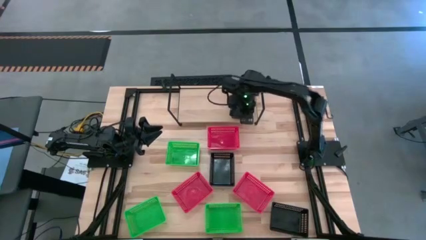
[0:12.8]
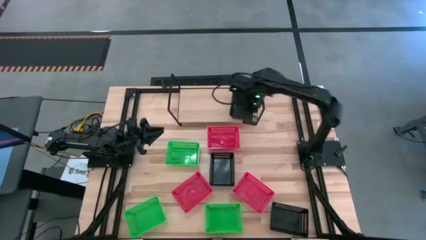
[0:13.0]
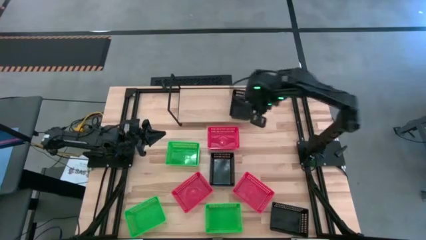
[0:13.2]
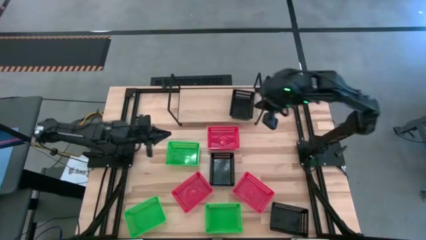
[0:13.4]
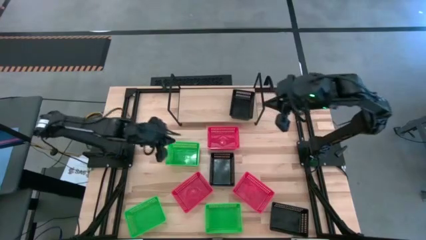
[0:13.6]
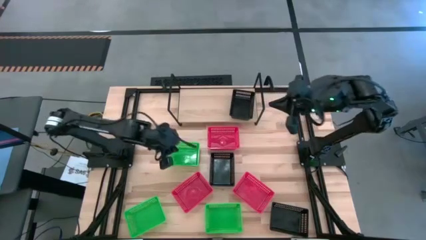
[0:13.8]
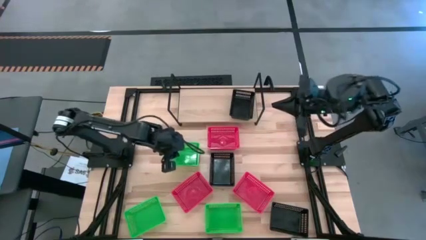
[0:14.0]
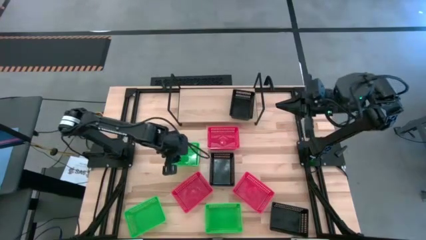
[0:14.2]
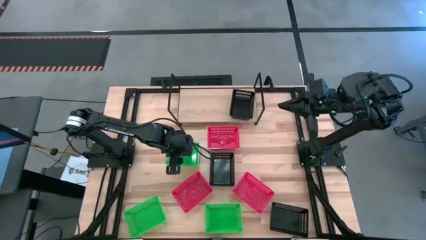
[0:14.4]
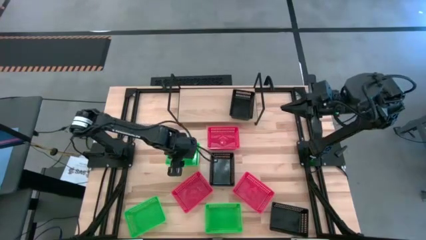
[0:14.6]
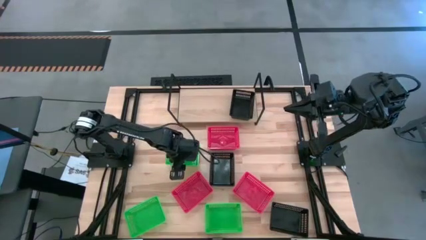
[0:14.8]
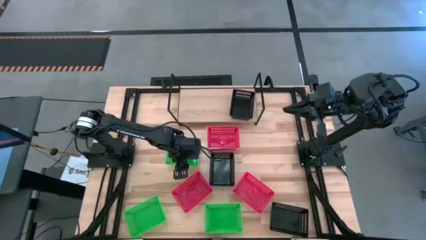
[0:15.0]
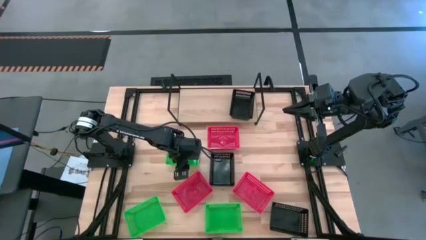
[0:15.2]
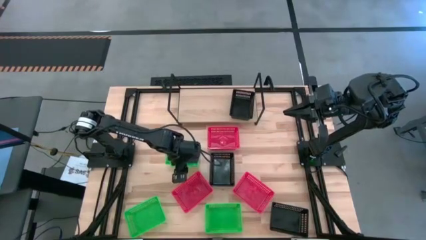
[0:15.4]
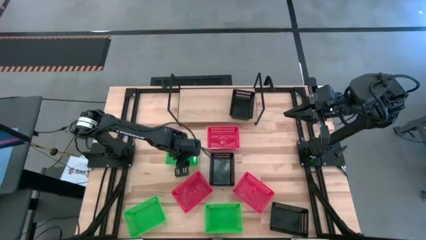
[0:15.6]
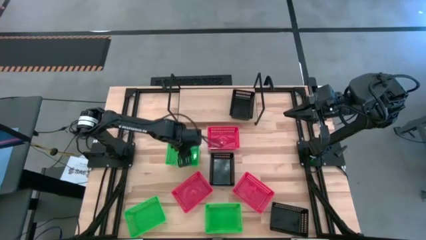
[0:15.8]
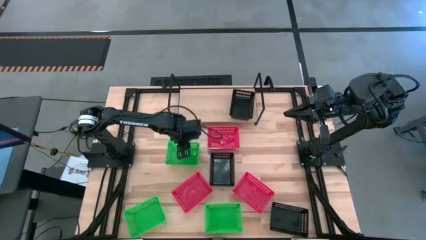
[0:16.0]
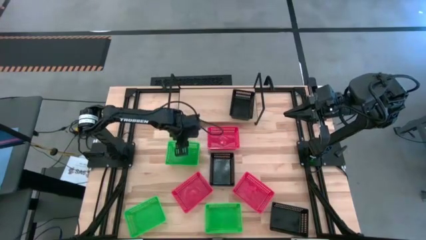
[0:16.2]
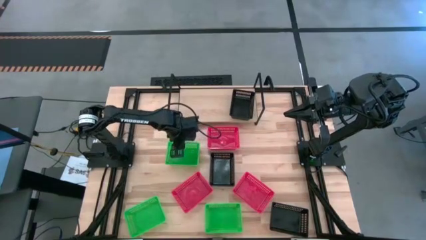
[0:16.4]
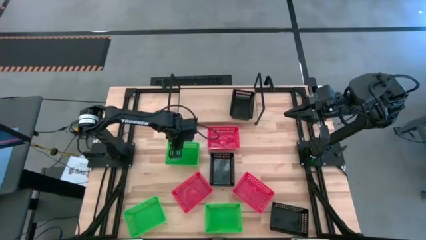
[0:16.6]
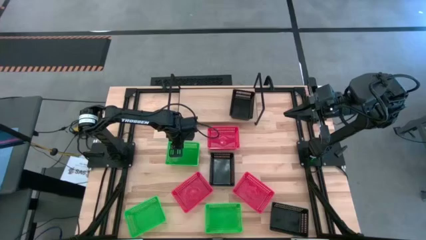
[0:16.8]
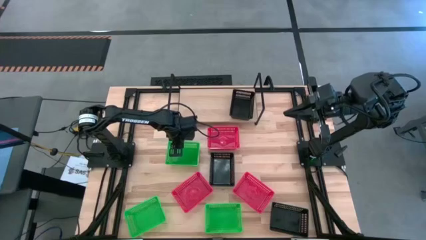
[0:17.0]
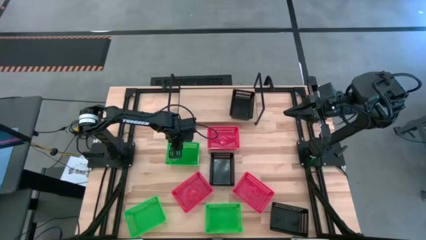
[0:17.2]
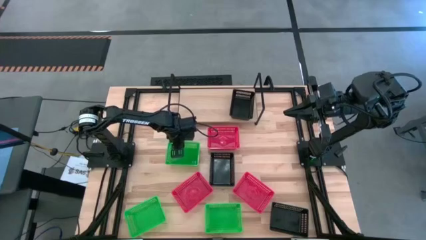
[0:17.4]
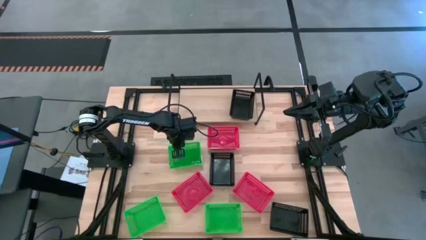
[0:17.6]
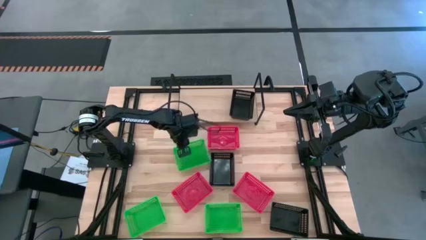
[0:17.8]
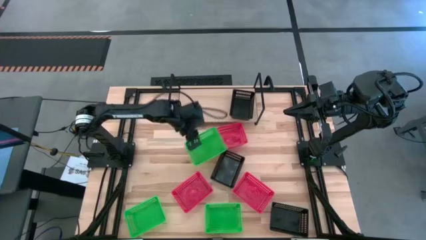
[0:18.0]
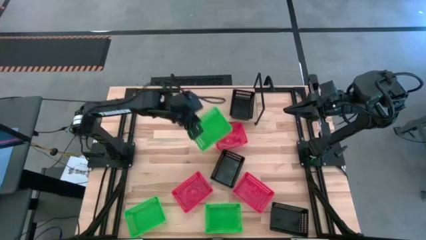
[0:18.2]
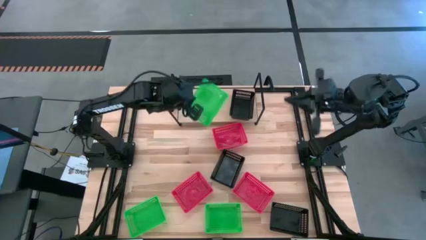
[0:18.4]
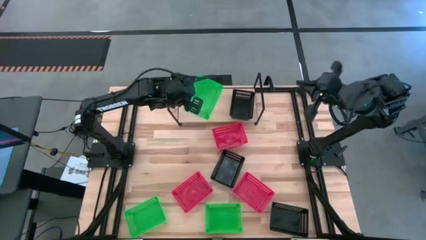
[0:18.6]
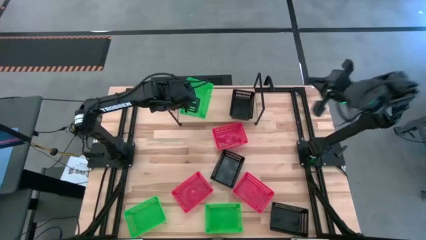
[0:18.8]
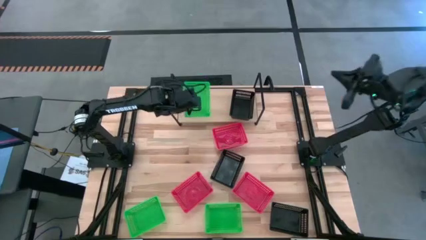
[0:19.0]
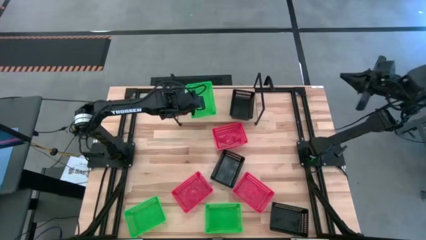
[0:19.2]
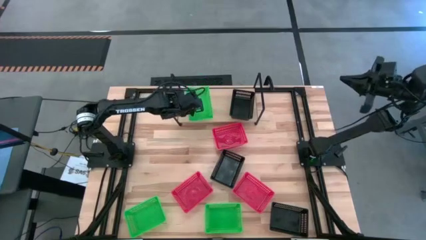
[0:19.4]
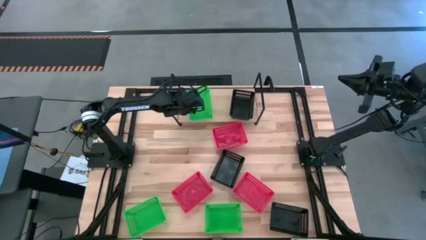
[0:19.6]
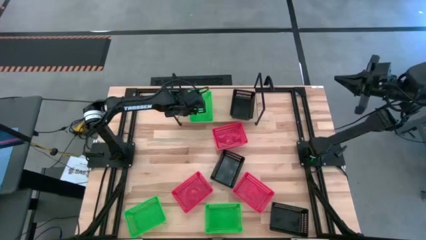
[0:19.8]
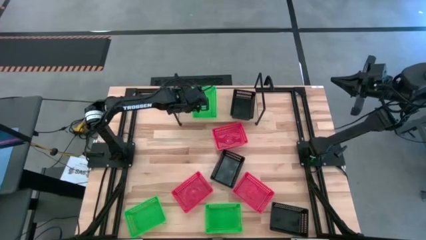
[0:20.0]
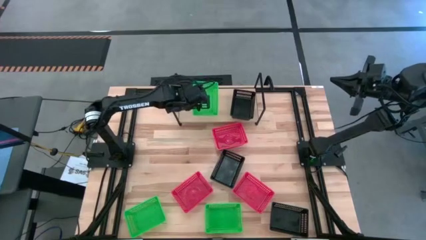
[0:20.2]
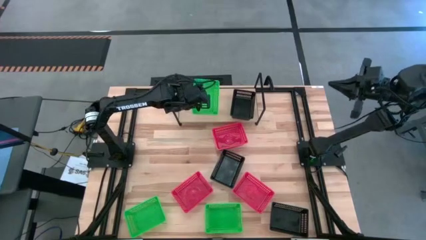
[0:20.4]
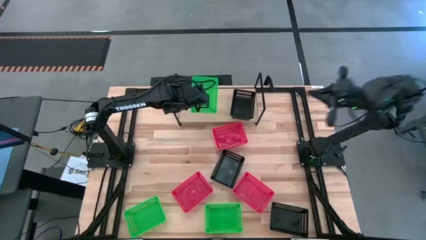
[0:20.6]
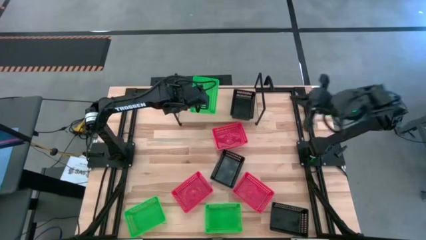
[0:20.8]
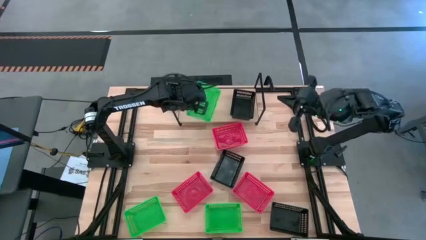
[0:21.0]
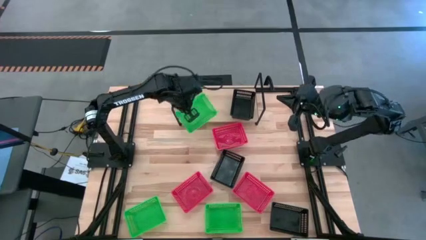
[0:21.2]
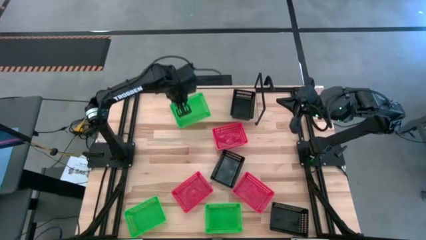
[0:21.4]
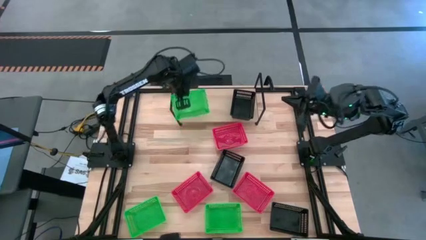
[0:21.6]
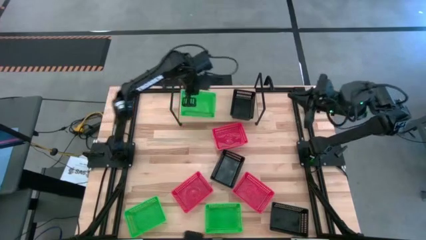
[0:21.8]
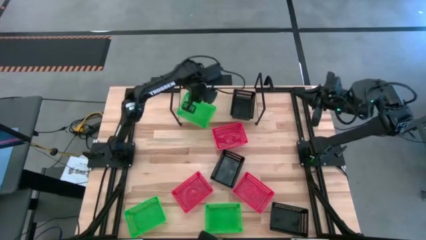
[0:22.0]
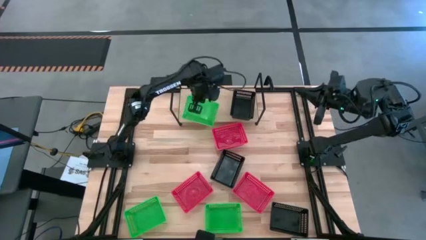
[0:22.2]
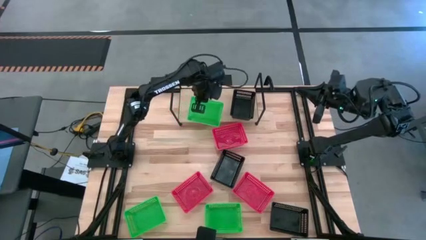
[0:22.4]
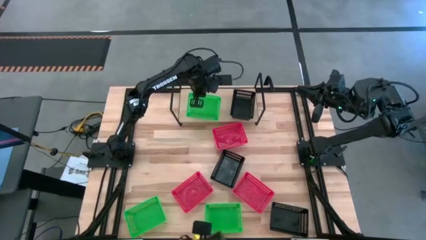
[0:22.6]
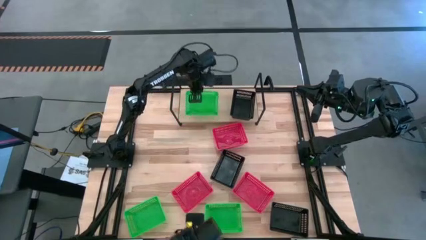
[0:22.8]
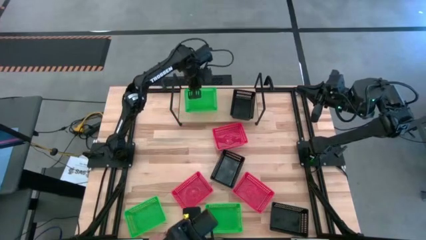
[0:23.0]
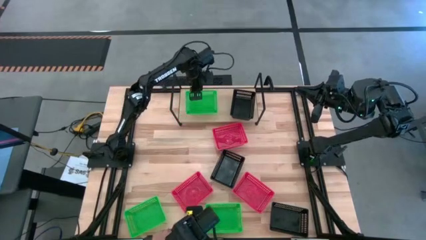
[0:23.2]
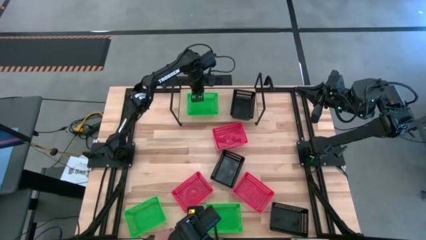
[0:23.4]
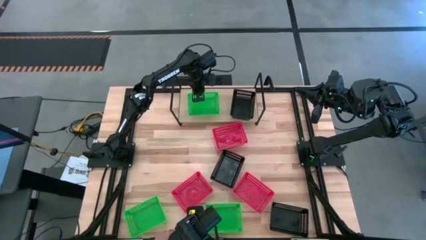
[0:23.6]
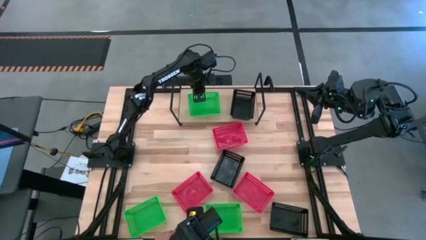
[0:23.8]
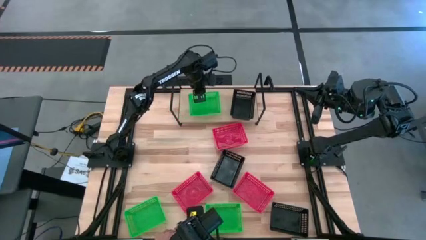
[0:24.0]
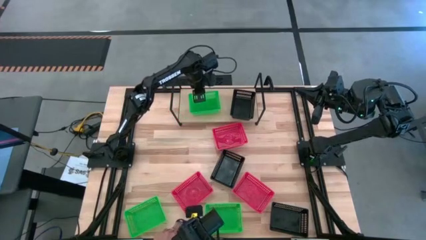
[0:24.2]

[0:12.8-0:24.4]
Task: Stack baskets on shelf by color
Put the top green bin on the shelf

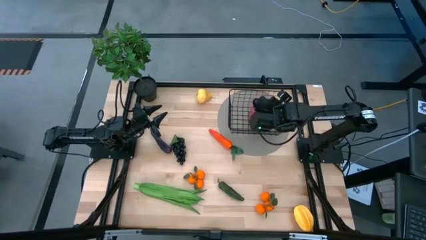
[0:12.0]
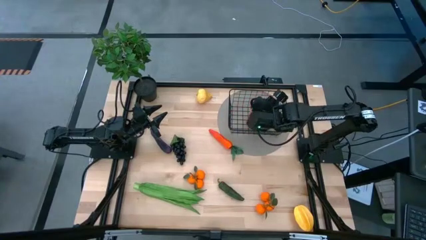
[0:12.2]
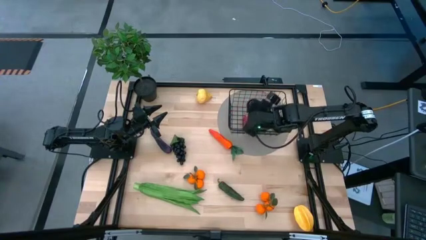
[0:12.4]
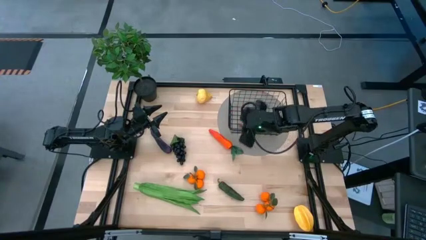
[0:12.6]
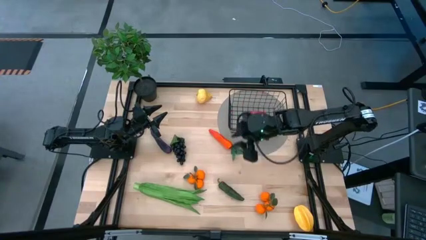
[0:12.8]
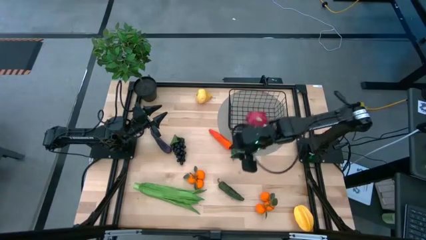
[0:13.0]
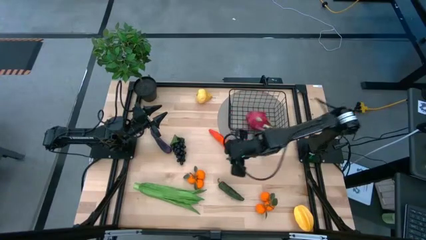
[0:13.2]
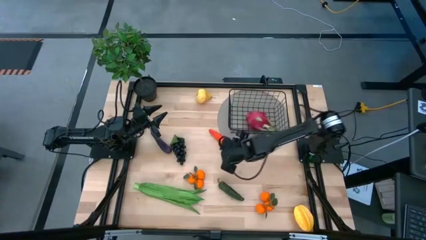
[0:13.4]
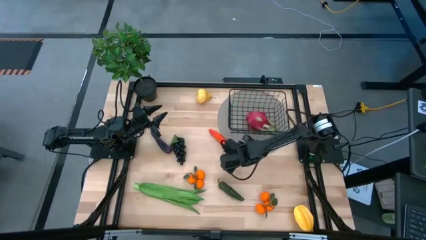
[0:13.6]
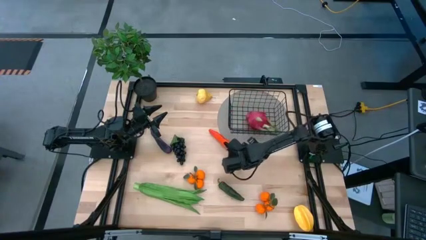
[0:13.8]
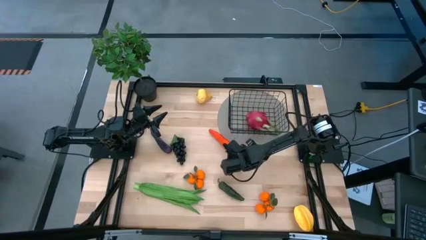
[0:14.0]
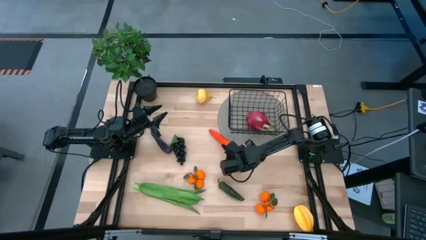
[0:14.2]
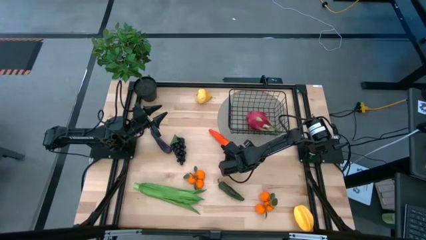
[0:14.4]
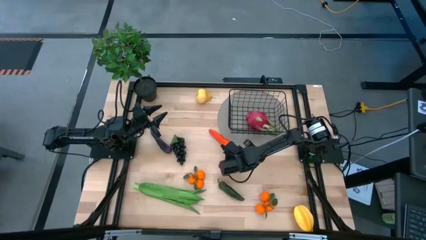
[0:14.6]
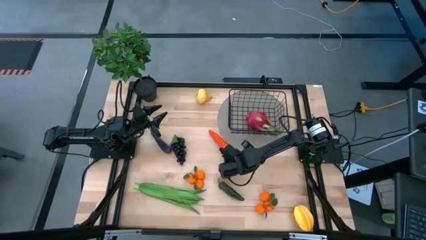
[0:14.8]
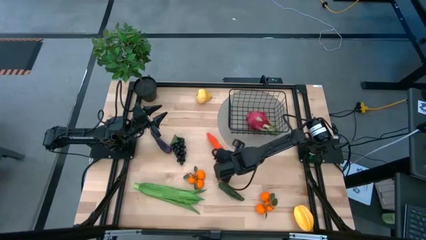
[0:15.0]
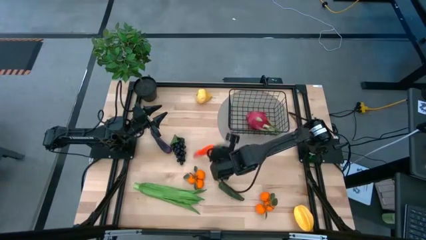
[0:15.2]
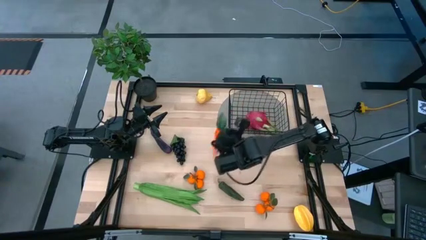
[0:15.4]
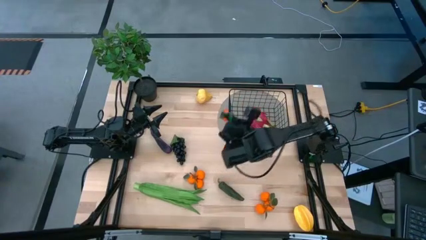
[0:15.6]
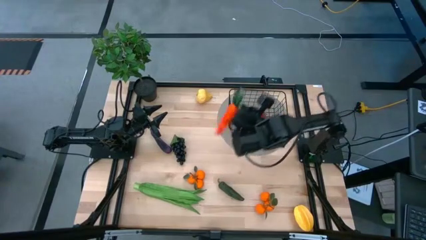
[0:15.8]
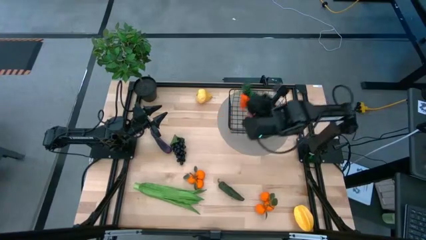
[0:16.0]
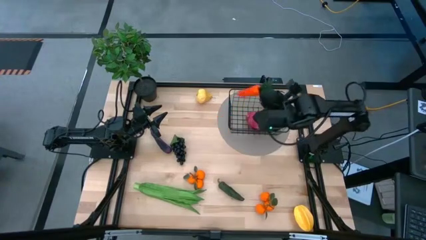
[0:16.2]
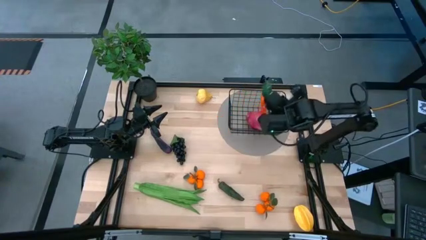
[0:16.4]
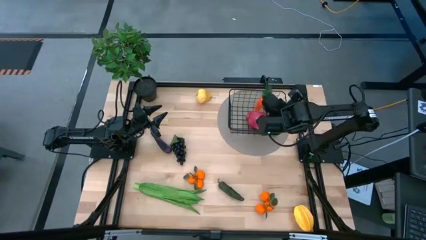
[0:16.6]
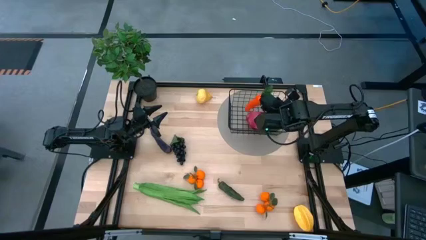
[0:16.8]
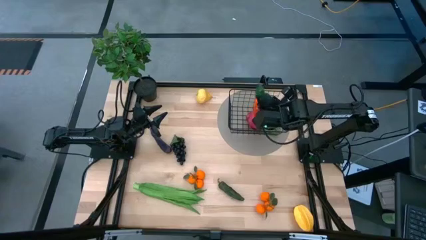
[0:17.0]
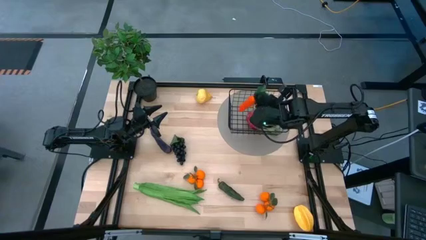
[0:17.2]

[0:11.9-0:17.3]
Task: Build produce basket
Put the carrot into the wire basket
